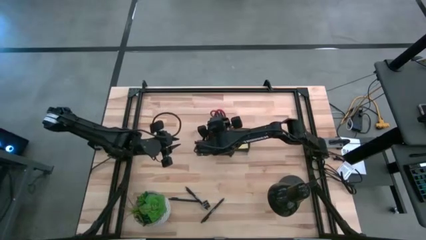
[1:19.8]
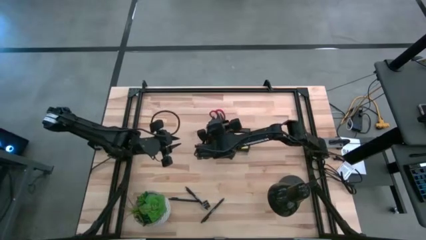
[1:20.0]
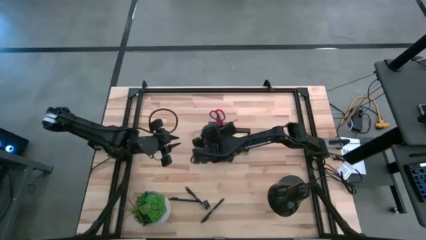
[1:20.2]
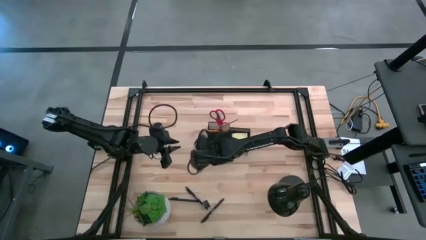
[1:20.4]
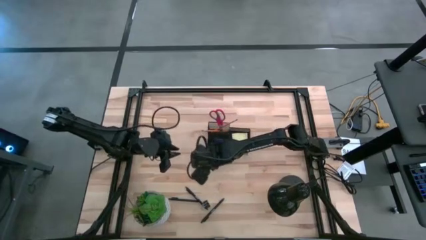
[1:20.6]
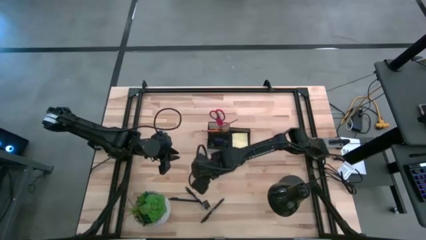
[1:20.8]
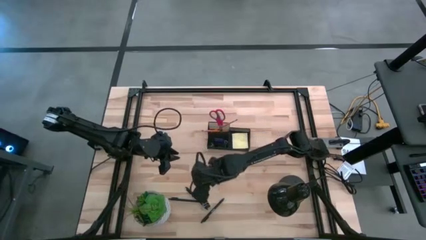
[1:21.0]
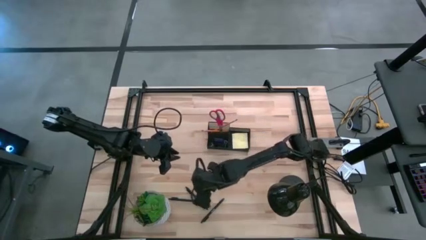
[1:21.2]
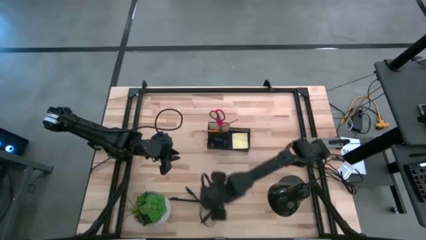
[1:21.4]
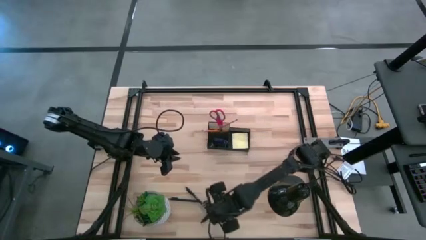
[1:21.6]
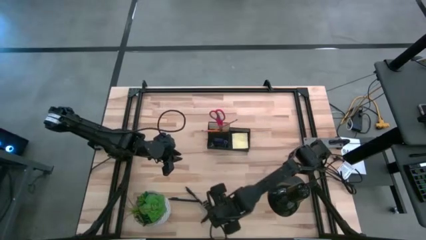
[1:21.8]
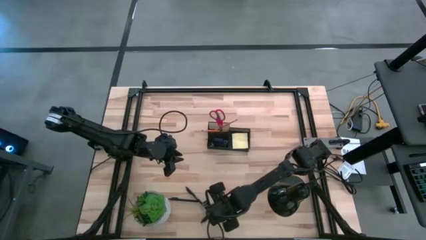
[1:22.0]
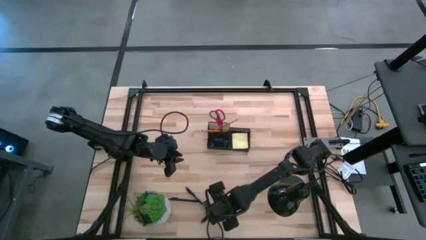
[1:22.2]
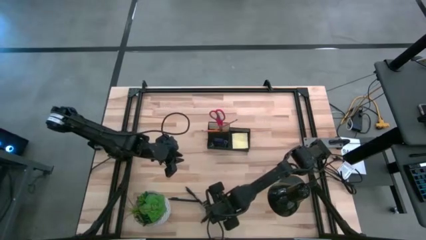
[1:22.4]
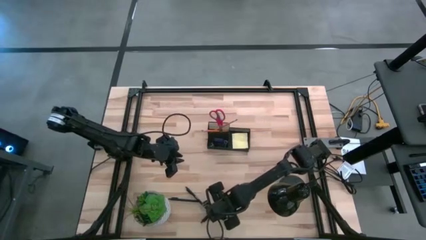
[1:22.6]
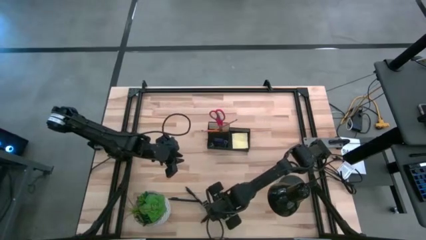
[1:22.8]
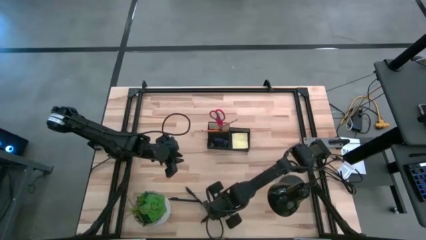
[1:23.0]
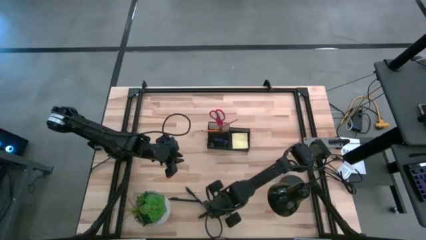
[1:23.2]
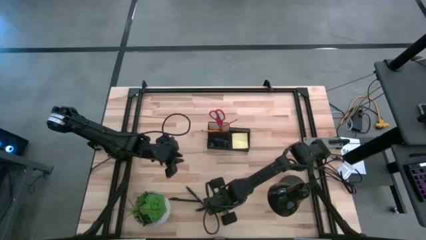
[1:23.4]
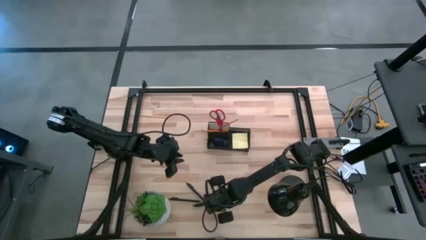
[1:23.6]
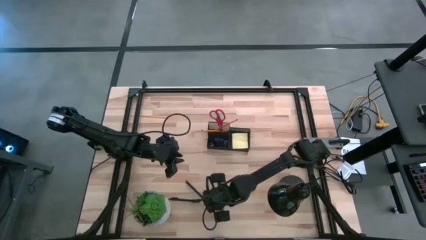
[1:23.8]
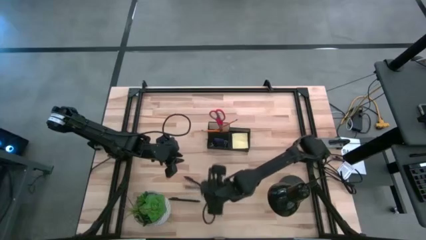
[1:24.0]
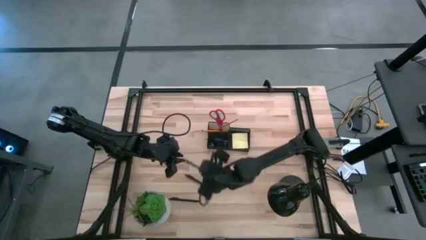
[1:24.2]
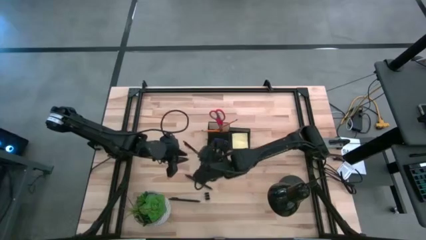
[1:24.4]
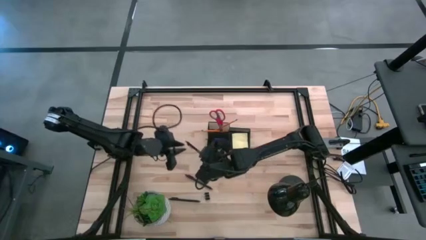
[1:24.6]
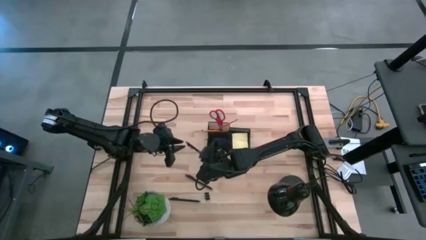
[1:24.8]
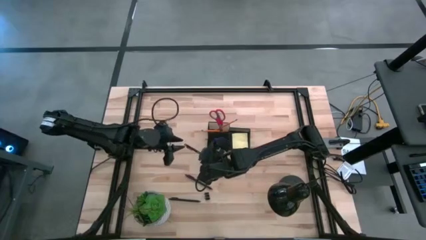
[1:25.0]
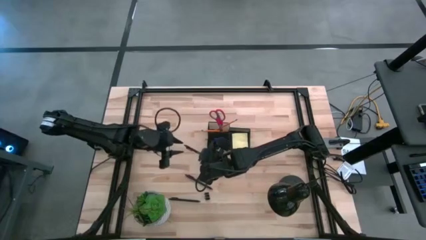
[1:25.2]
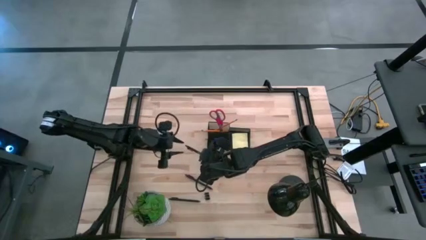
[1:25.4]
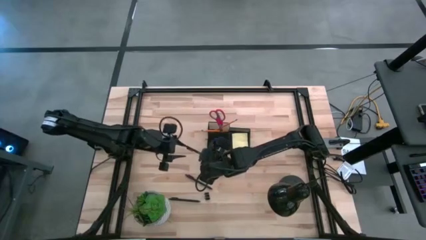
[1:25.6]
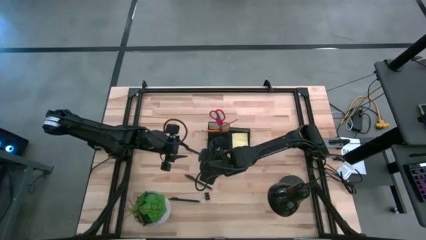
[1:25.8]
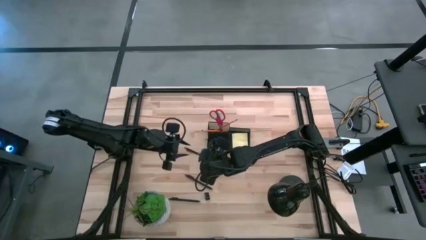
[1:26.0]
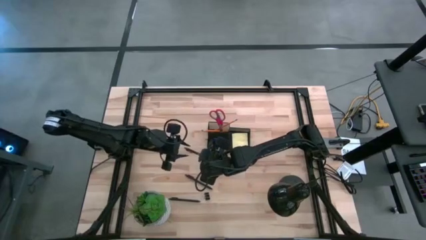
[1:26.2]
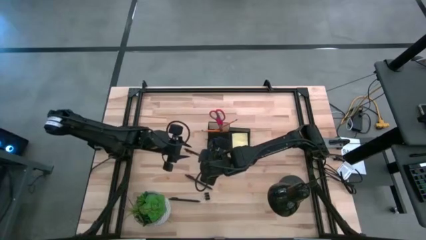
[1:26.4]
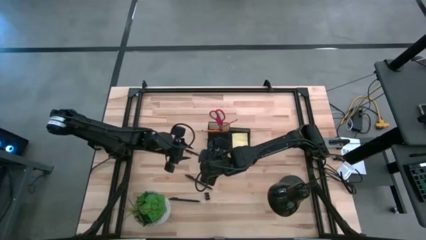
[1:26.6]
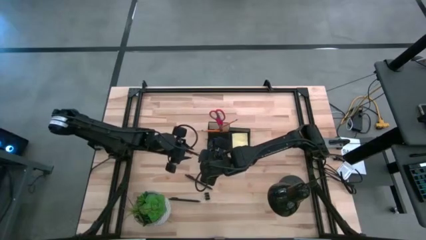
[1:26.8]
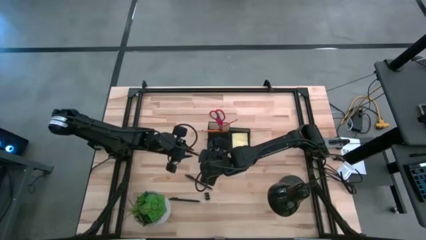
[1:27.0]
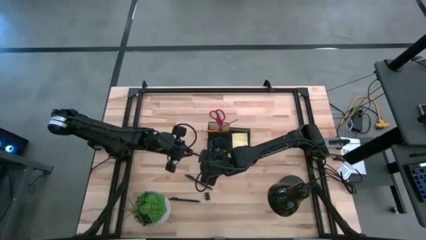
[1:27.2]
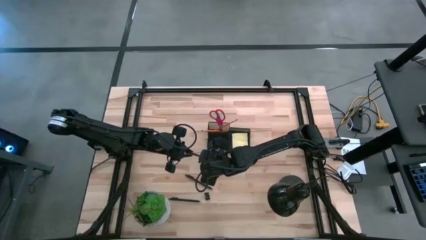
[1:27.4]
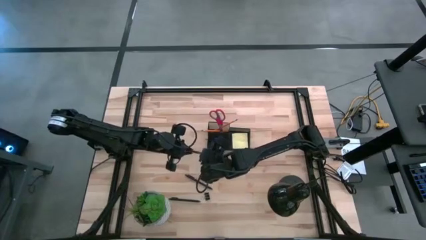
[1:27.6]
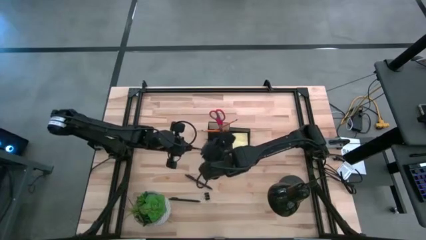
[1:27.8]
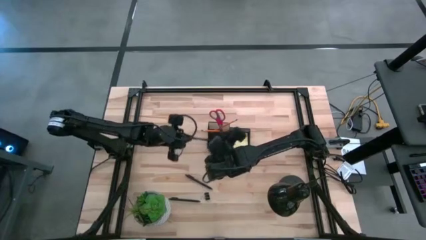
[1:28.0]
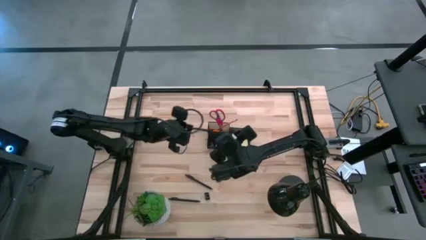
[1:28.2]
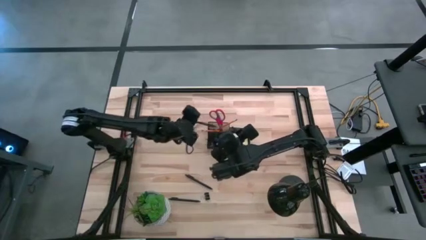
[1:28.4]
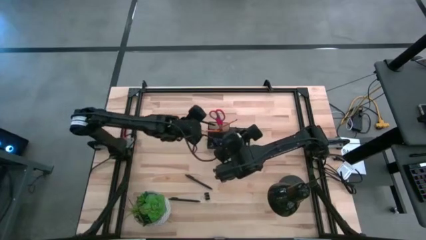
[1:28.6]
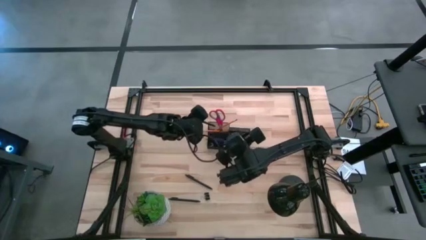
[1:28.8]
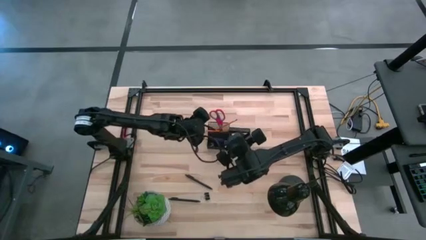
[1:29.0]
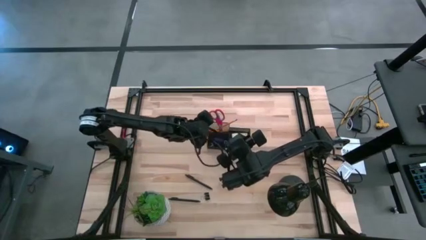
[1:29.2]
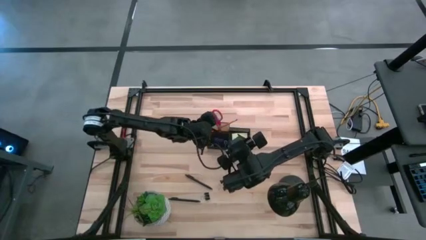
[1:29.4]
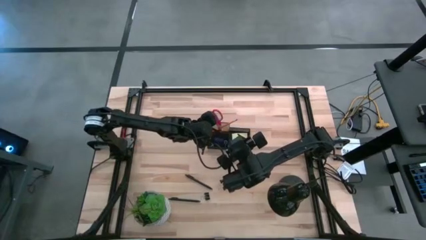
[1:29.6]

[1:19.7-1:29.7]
Task: Pick and place office supplies into organizer
Put the bottom right black pen into the desk organizer

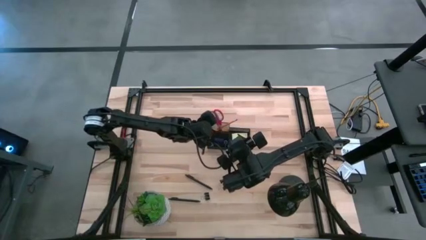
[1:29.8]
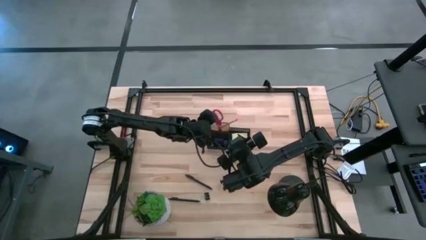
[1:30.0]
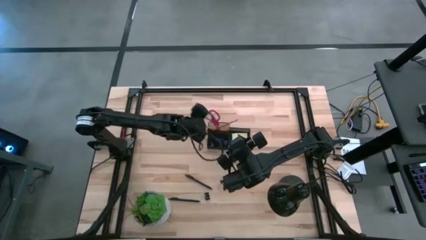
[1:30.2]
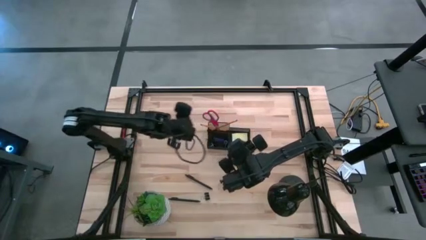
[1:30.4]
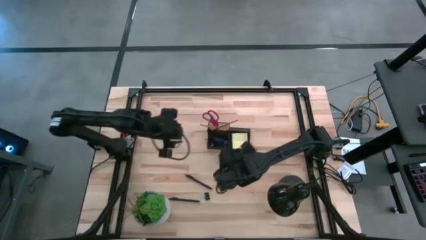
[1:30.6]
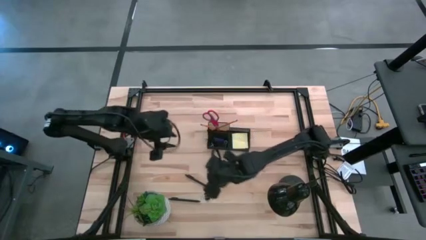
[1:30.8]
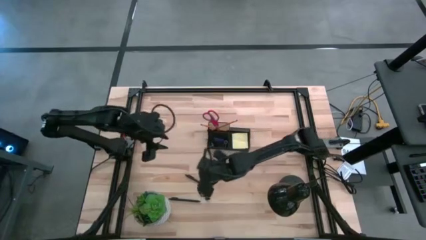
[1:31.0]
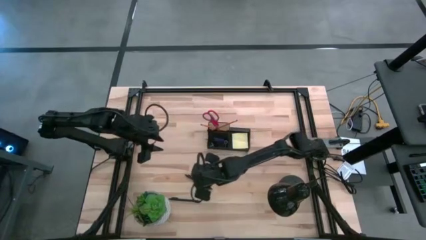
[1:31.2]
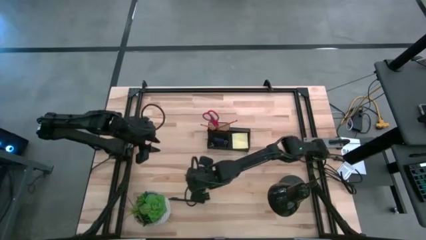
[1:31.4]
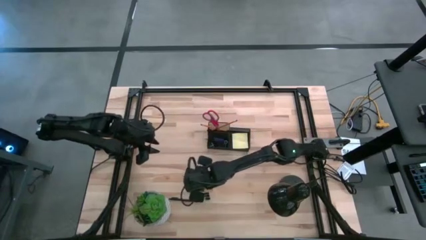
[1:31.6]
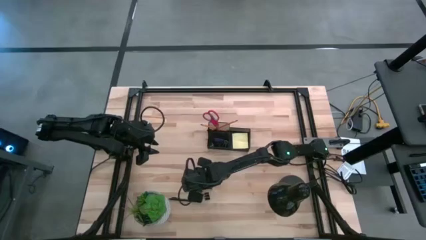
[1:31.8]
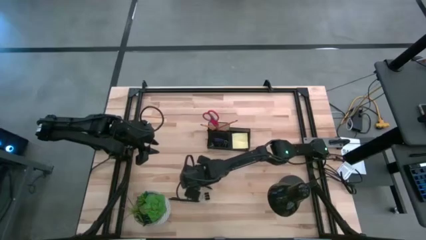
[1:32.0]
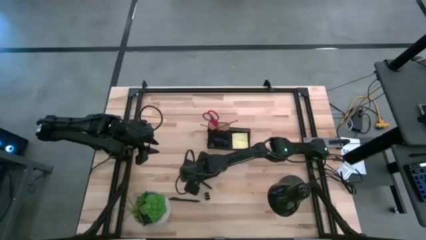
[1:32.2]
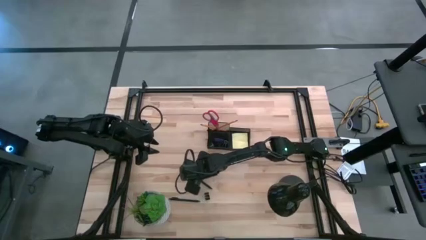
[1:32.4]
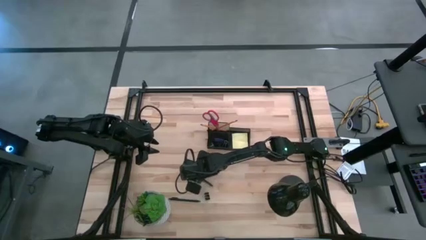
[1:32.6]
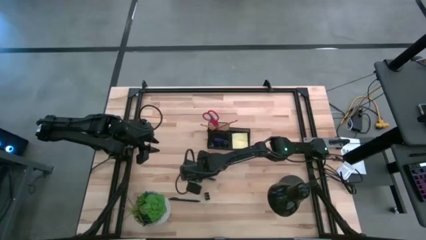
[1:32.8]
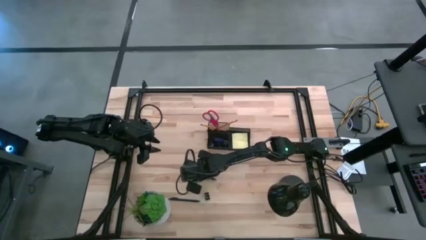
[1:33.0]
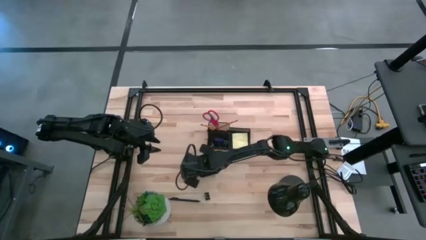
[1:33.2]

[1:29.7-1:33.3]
Put the top black pen into the desk organizer

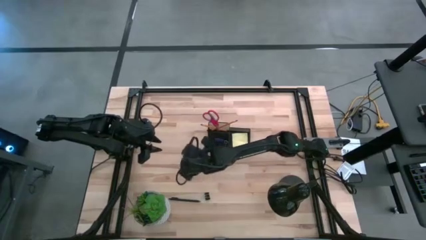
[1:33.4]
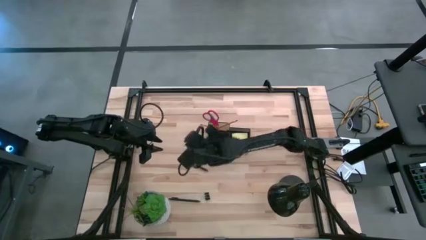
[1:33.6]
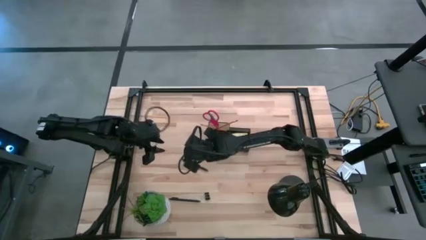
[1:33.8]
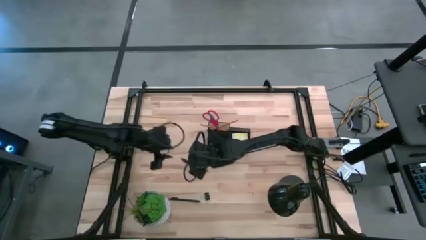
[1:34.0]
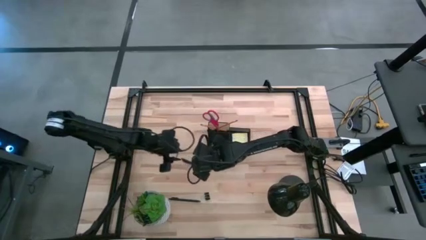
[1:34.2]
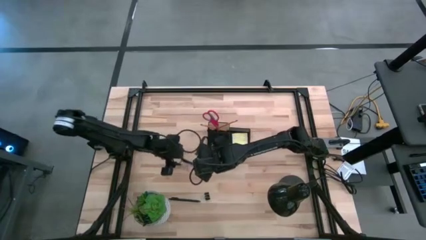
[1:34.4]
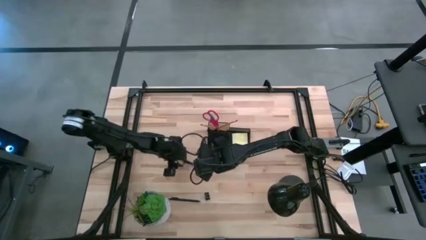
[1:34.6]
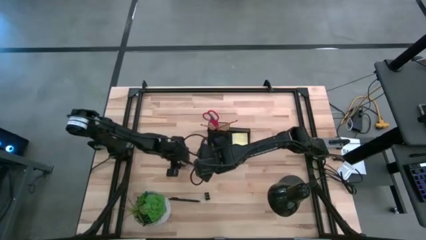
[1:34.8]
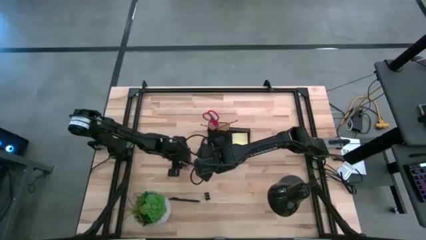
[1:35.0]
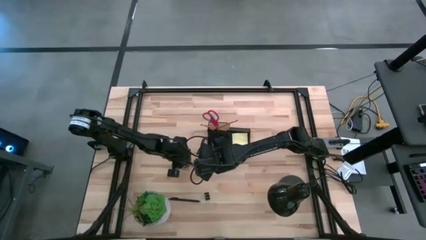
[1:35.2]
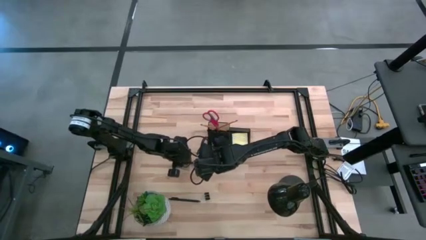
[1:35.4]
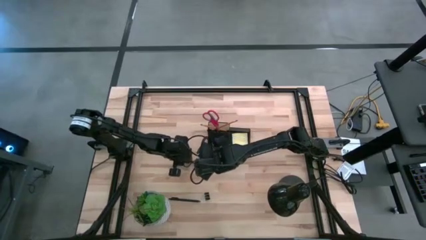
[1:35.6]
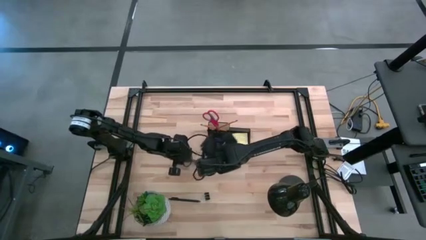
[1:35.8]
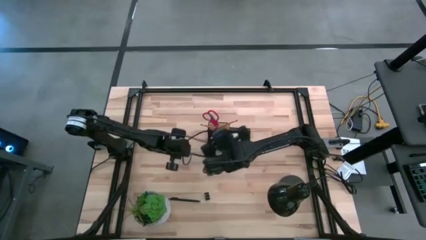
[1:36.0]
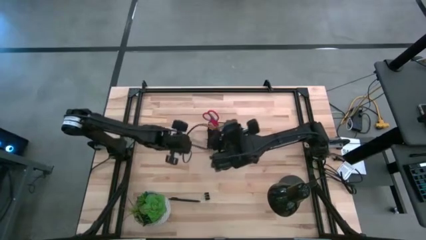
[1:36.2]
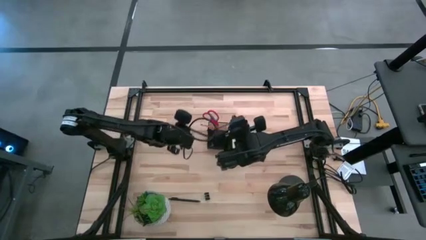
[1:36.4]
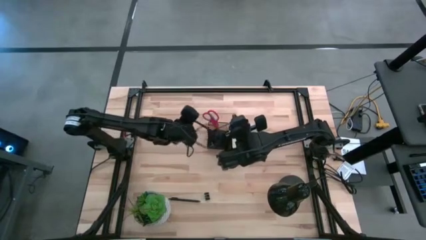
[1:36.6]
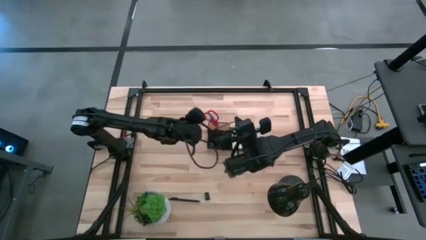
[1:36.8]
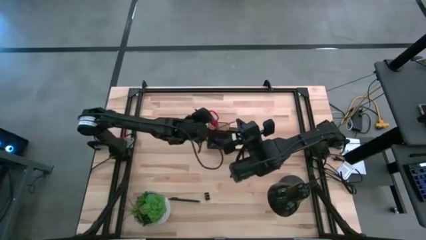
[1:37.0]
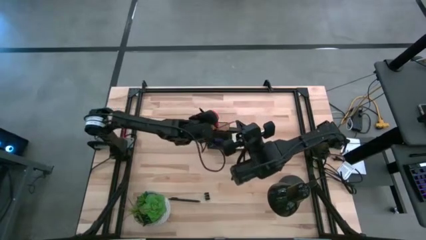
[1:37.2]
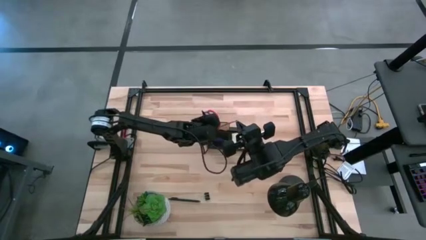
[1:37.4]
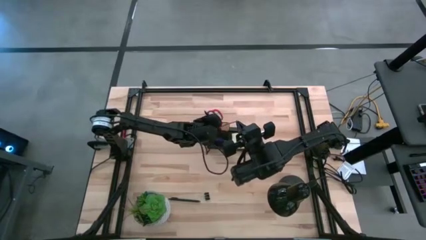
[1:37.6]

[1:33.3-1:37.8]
Put the top black pen into the desk organizer
